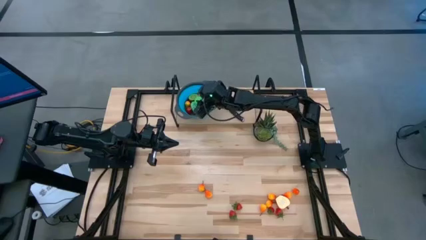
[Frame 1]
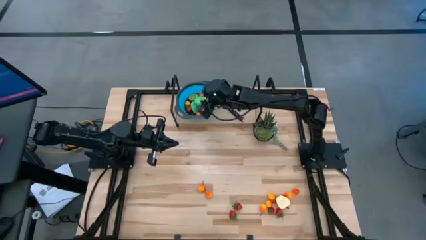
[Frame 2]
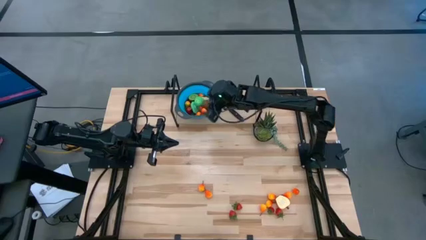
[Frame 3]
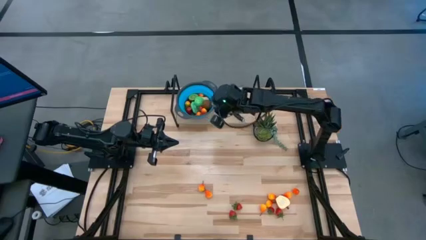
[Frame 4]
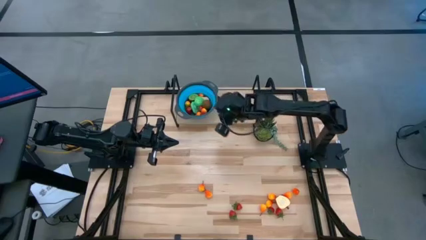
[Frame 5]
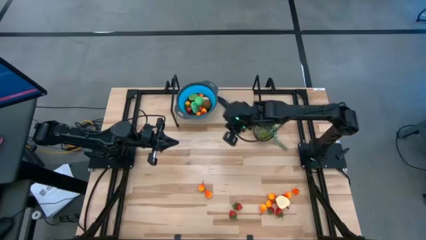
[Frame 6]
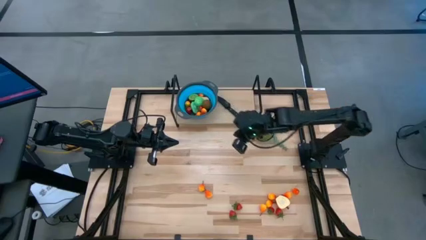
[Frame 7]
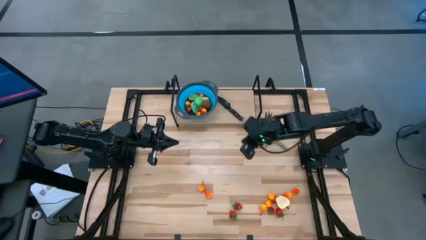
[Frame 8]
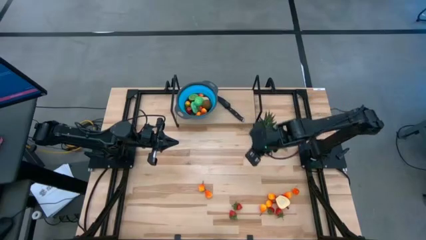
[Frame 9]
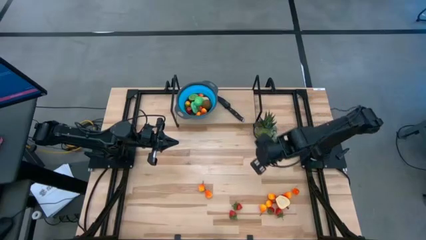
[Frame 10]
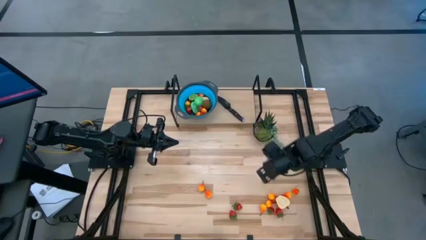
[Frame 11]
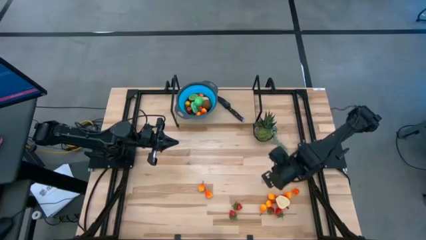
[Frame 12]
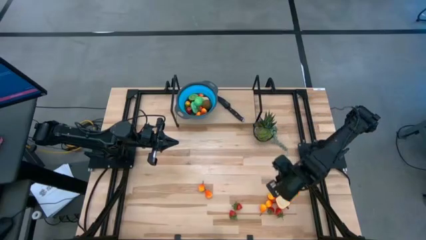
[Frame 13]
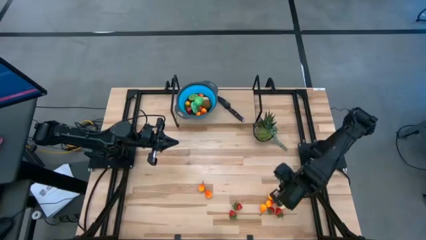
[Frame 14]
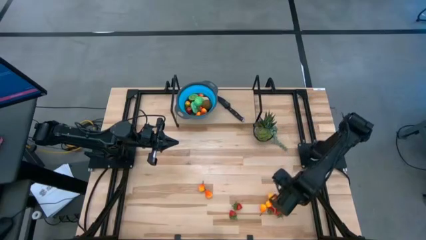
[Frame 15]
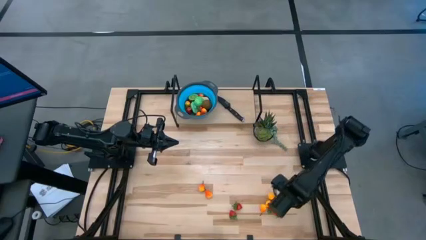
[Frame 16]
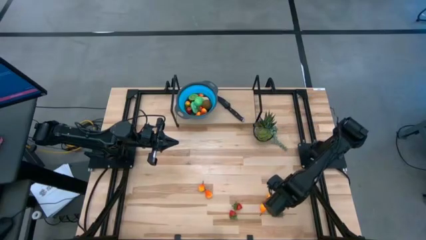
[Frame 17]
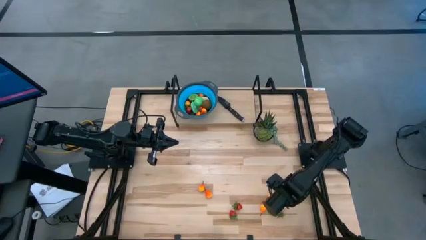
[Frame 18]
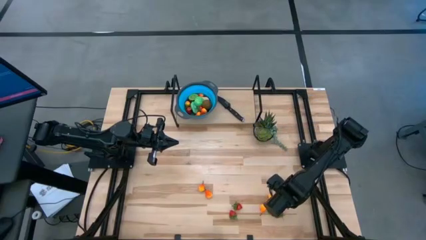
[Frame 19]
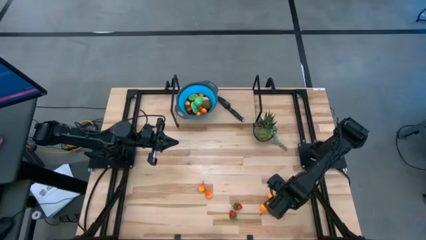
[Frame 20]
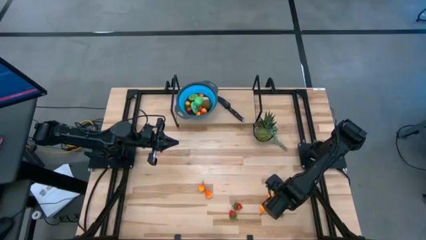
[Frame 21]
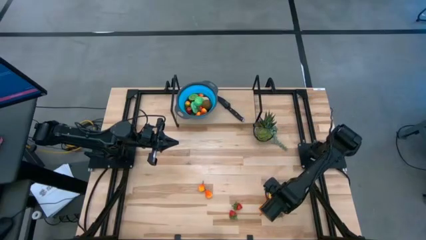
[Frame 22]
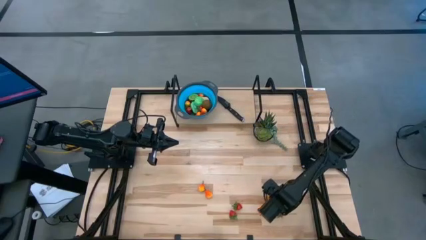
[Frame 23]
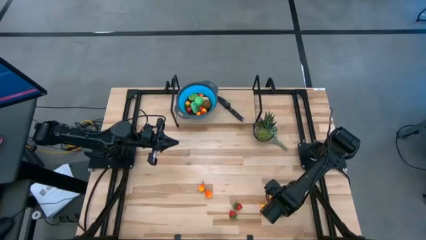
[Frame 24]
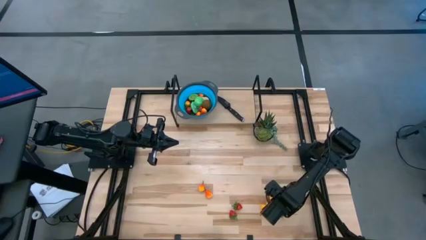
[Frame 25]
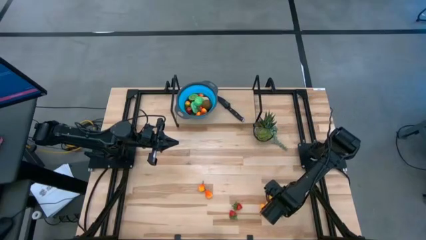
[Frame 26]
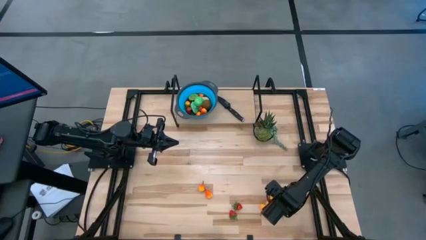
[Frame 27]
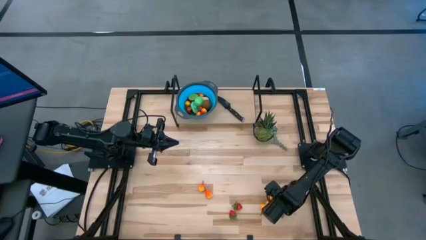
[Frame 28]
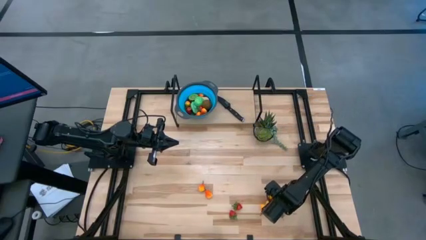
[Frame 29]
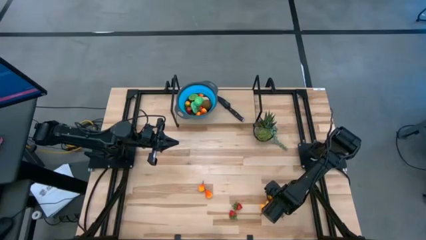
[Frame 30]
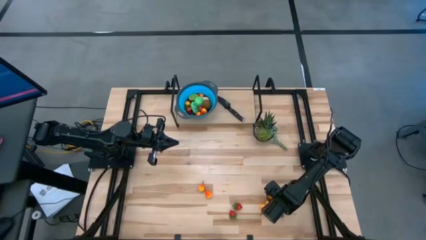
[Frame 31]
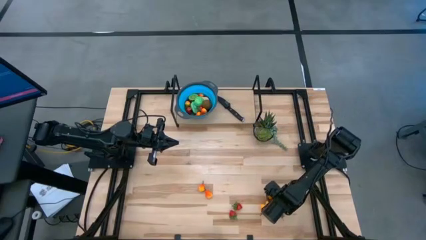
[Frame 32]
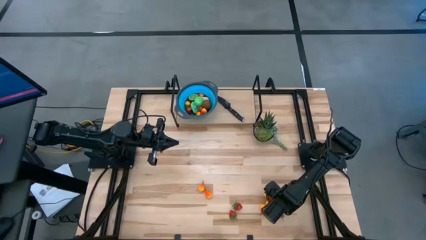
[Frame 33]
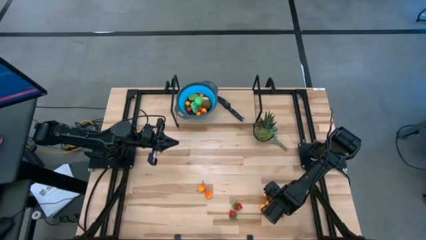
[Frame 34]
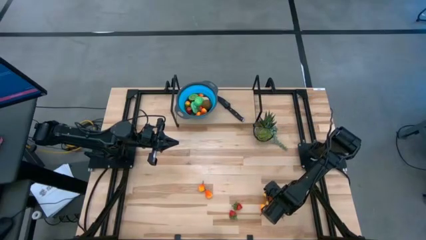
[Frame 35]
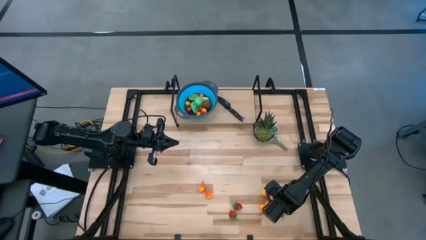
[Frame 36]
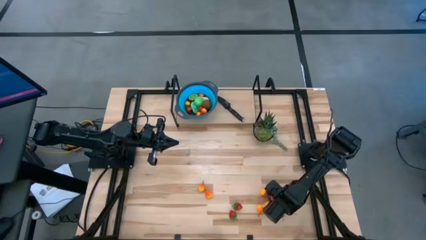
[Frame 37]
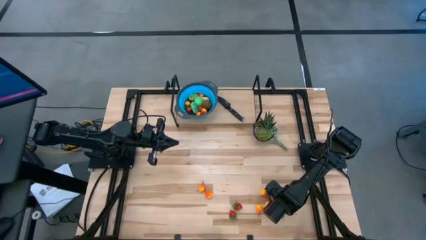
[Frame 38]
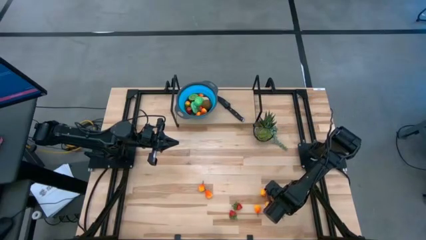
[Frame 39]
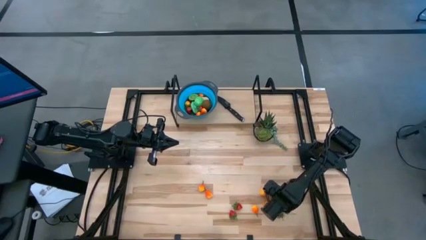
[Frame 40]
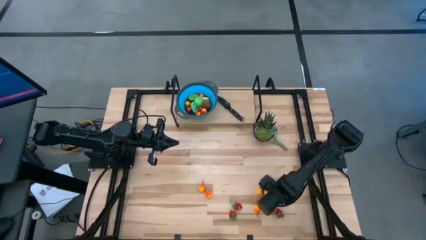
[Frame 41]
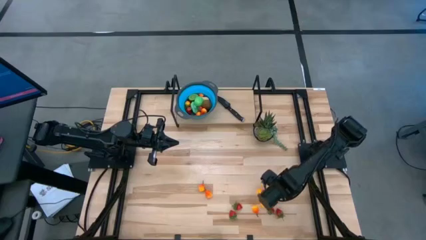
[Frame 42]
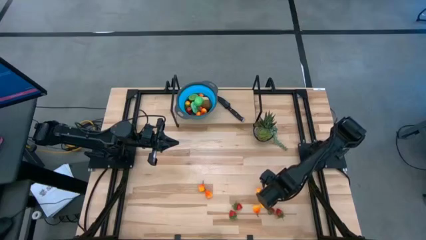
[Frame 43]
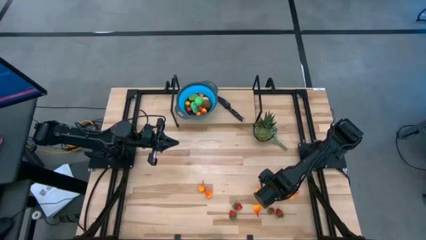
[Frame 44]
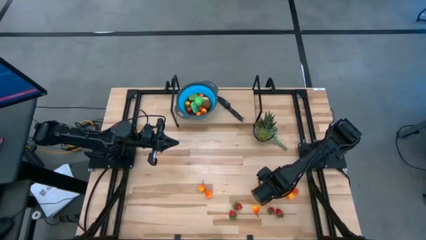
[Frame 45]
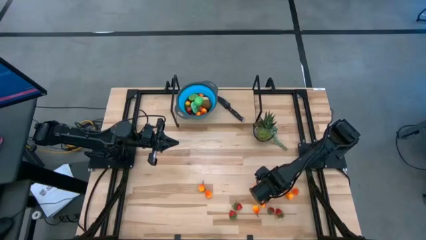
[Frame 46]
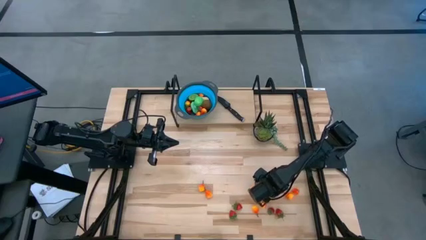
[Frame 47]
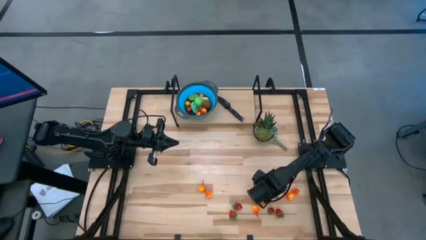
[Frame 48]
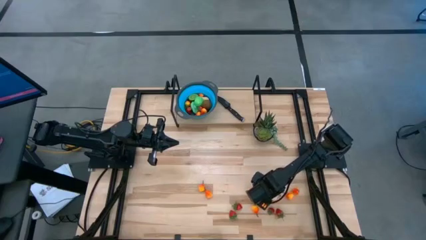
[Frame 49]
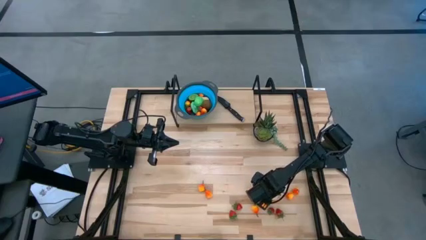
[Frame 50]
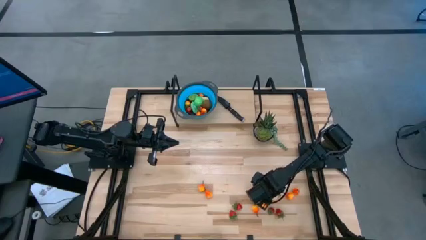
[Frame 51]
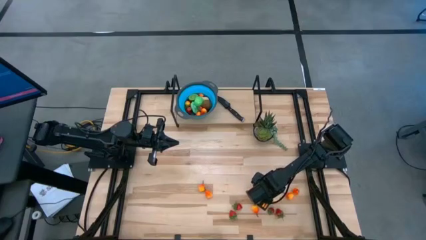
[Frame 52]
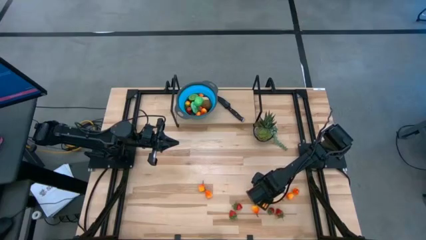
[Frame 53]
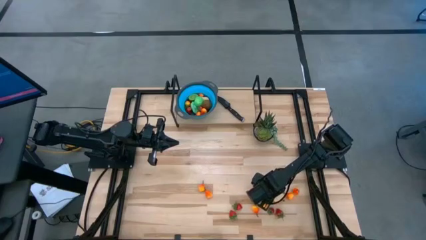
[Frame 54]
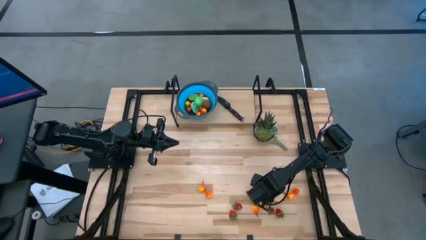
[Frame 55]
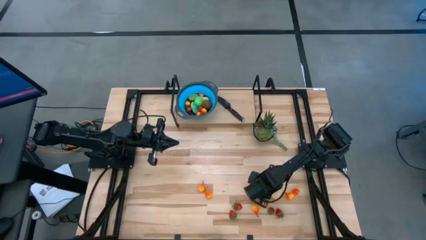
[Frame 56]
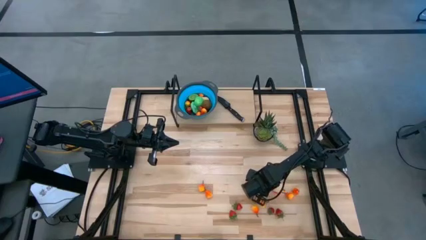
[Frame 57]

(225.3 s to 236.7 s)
Task: Pick & Place Fruit
Put the apple into the basket

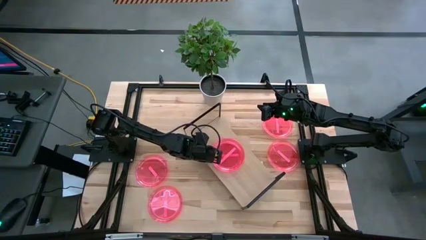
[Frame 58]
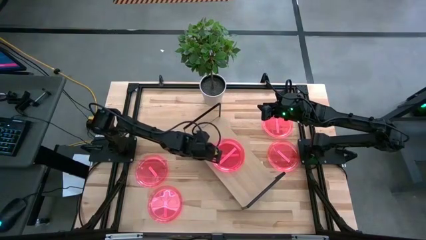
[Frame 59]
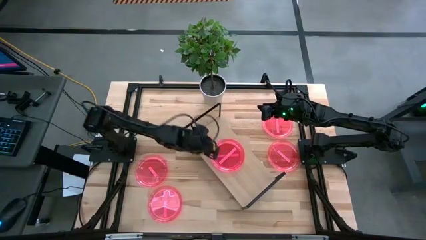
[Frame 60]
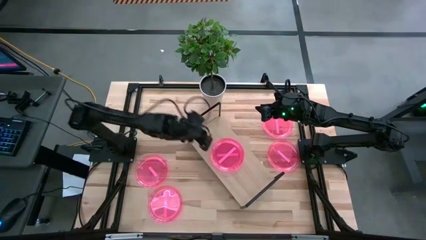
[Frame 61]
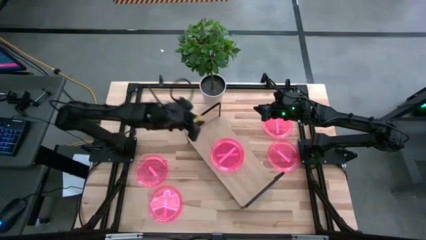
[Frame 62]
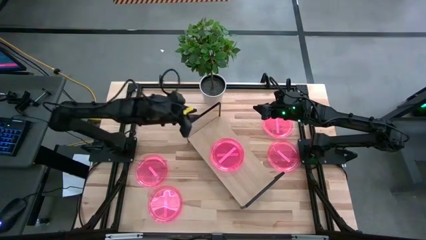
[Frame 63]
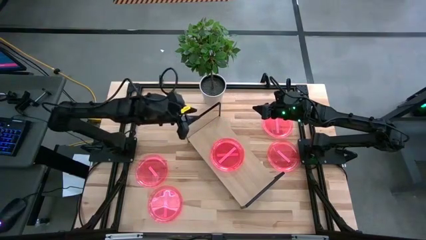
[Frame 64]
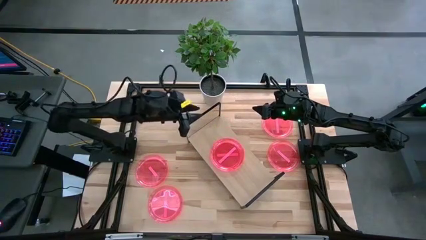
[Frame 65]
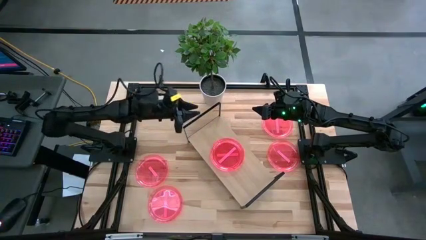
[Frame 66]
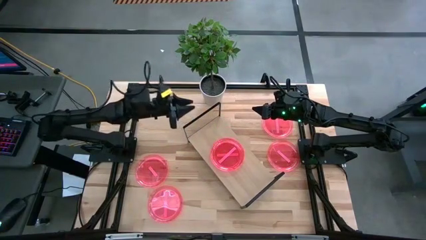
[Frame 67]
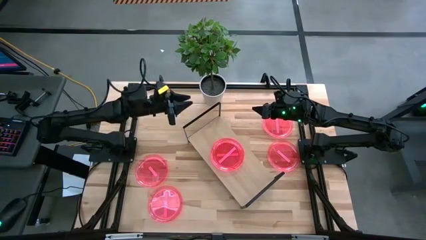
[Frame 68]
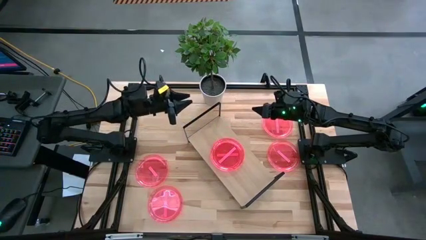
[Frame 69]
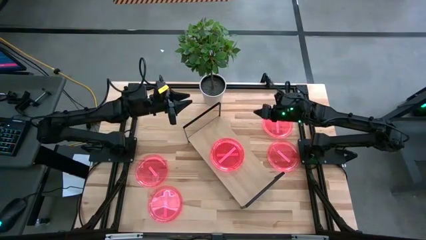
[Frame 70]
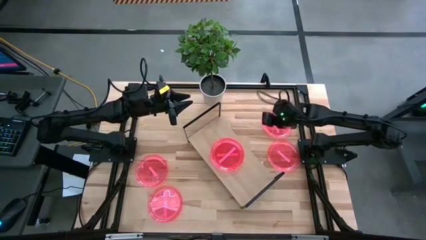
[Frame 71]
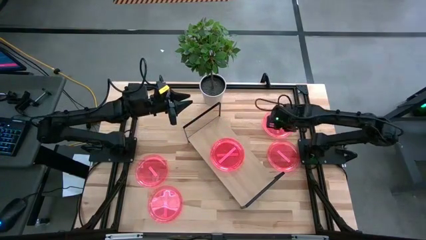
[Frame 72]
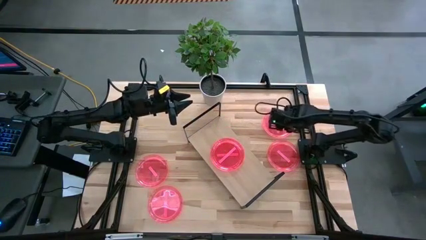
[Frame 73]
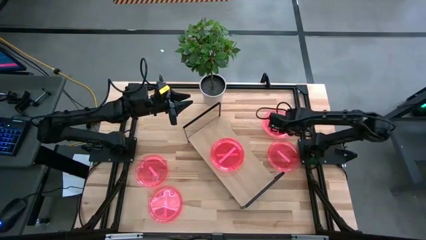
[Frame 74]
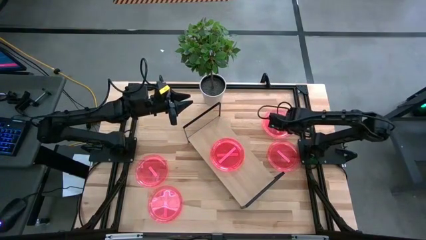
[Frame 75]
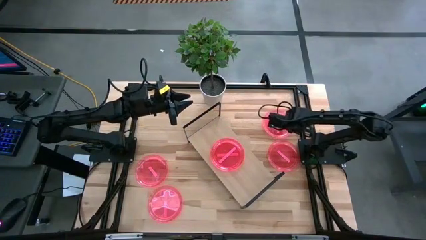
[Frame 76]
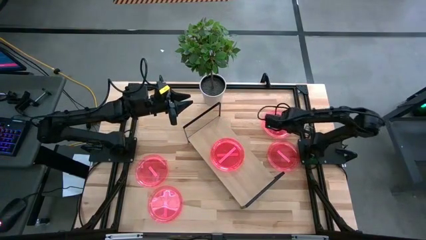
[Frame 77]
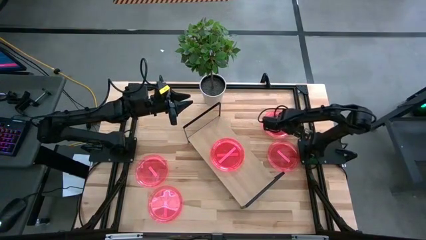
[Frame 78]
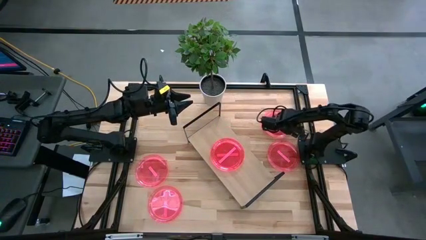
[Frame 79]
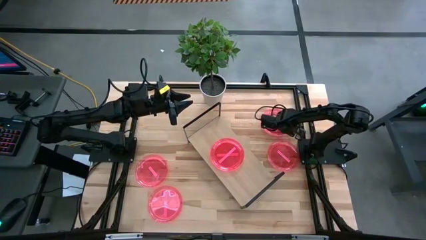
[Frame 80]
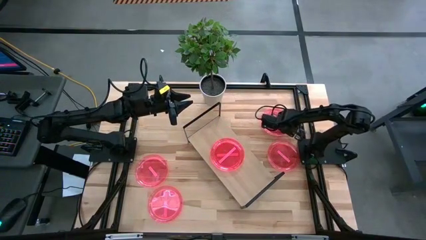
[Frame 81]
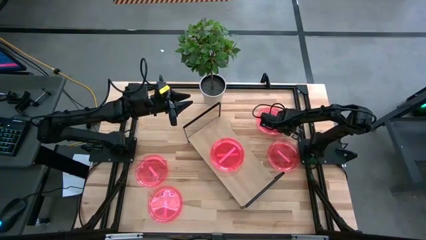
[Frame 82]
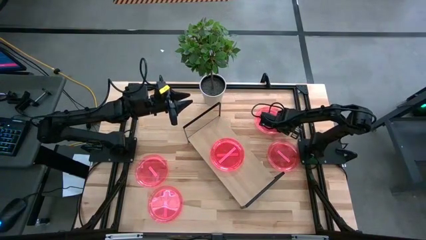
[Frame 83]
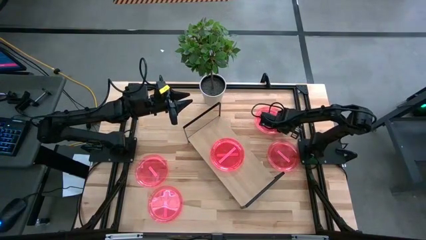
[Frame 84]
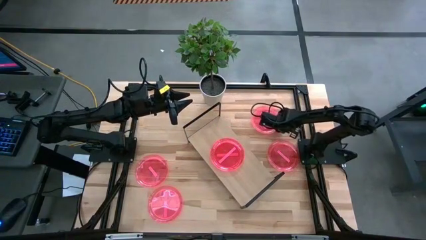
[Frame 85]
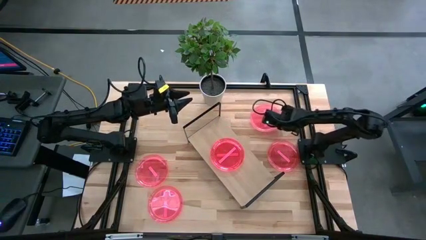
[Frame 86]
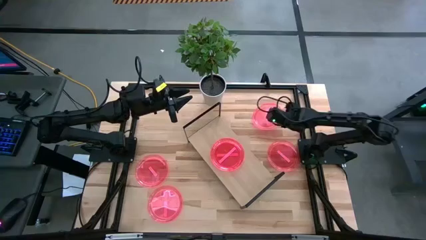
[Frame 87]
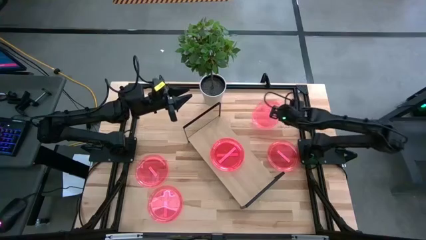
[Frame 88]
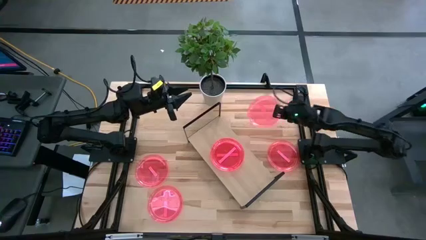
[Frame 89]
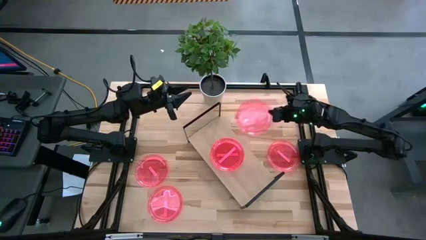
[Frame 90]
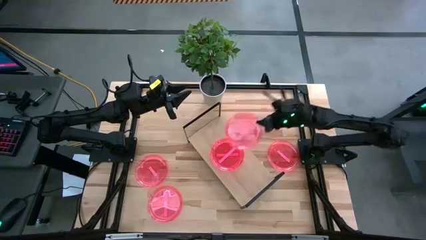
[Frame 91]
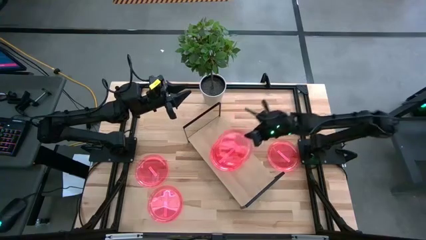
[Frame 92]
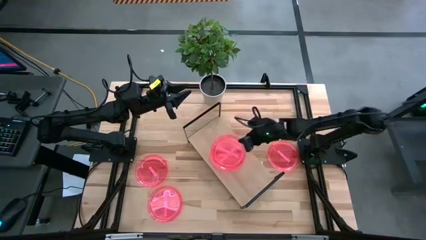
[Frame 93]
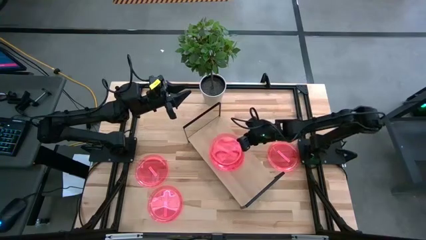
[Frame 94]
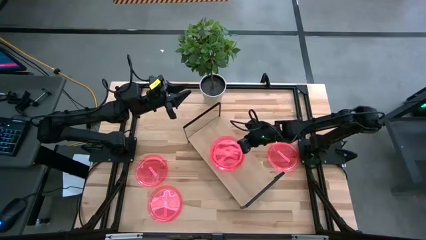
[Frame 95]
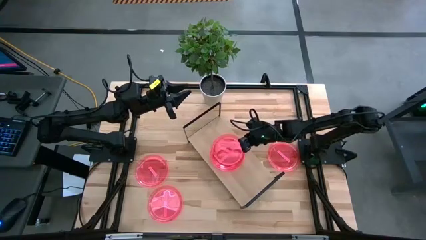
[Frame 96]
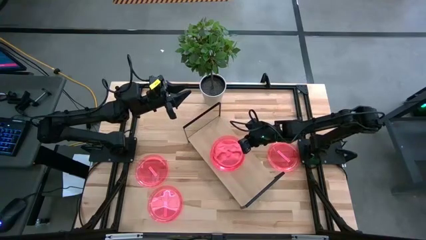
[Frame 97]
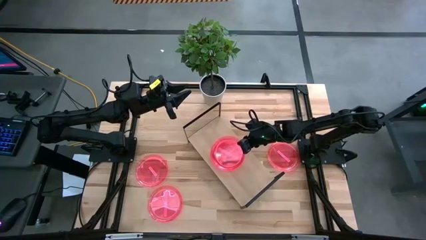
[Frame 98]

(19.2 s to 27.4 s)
Task: Place and stack plates onto a shelf
Stack the pink plate on top of the other pink plate on the shelf
